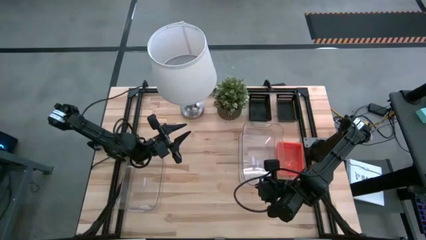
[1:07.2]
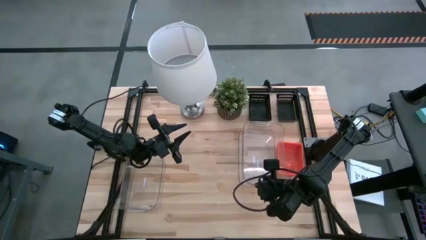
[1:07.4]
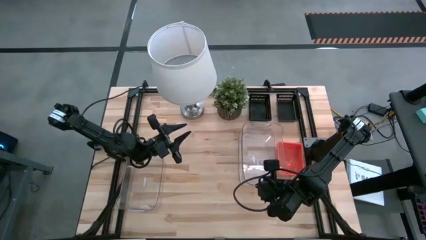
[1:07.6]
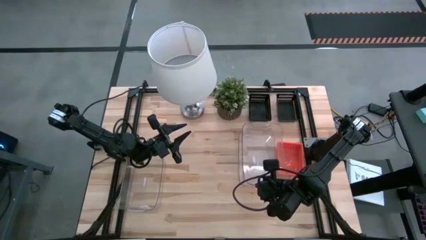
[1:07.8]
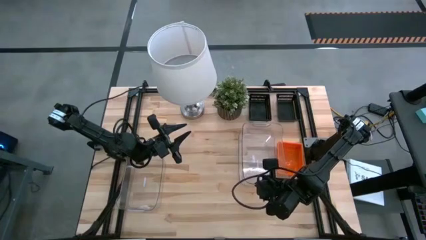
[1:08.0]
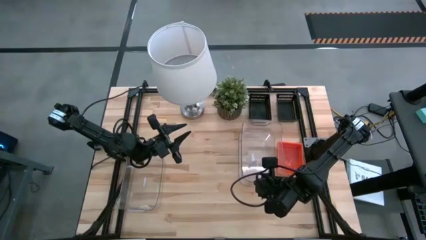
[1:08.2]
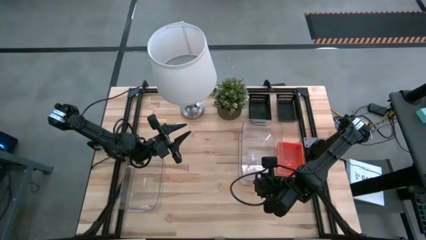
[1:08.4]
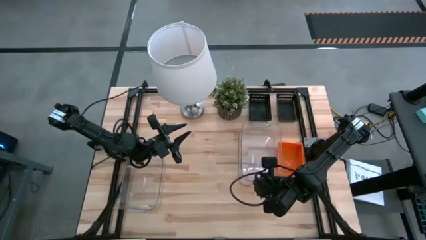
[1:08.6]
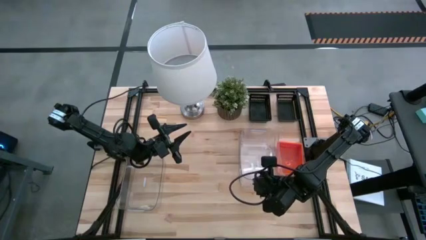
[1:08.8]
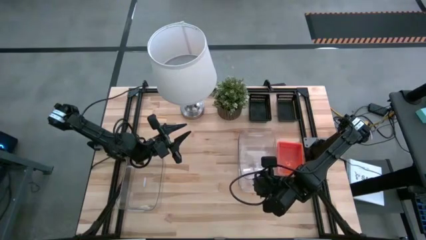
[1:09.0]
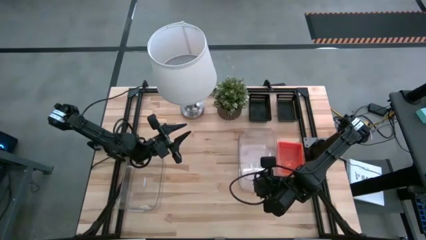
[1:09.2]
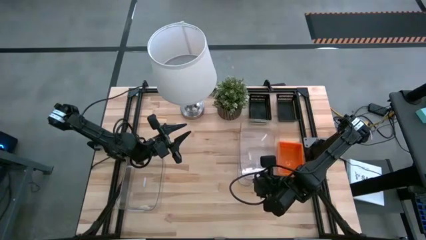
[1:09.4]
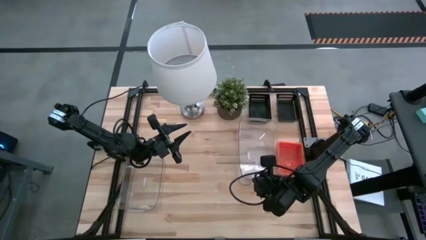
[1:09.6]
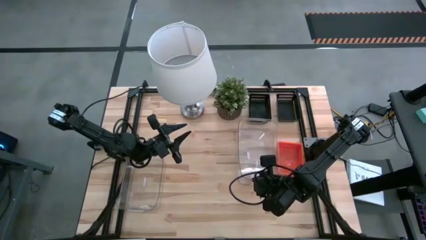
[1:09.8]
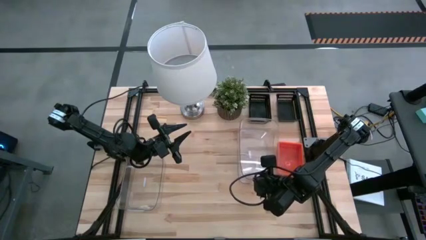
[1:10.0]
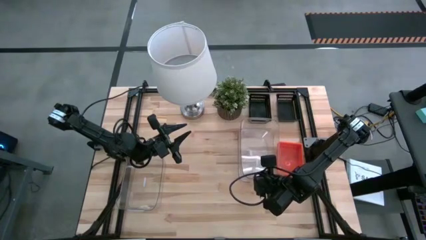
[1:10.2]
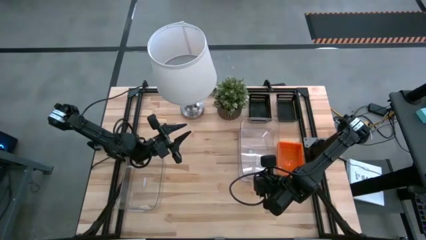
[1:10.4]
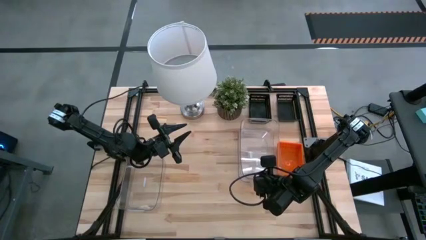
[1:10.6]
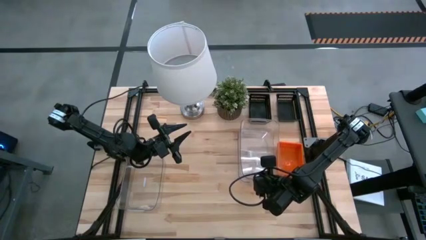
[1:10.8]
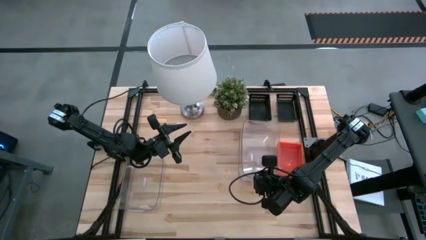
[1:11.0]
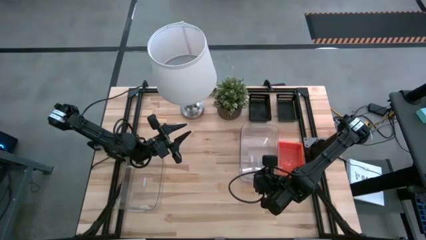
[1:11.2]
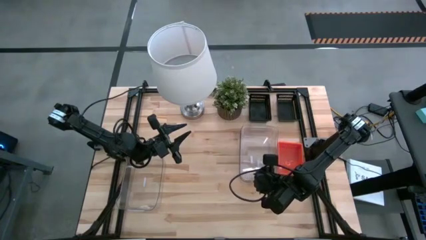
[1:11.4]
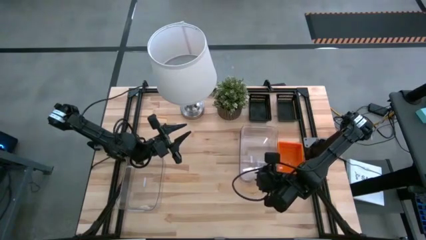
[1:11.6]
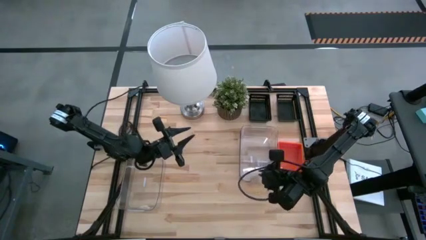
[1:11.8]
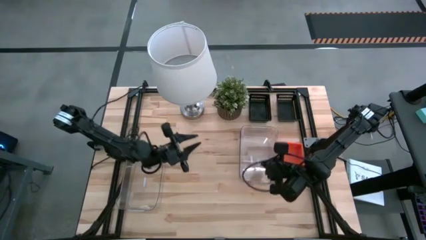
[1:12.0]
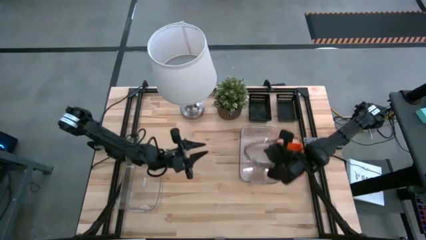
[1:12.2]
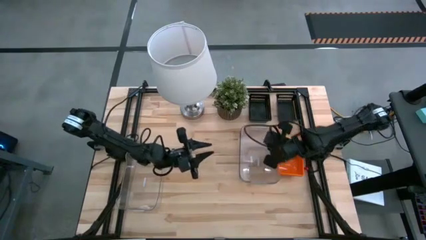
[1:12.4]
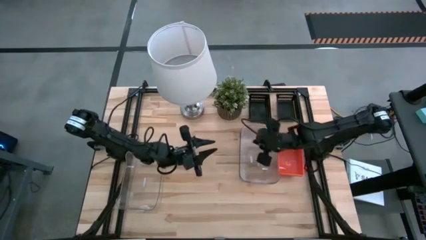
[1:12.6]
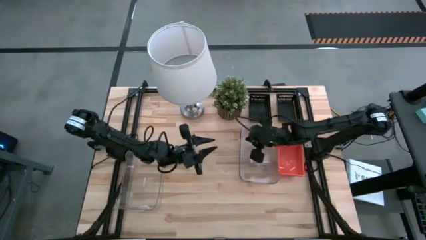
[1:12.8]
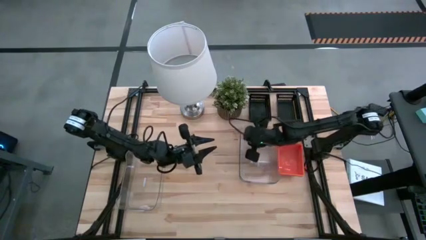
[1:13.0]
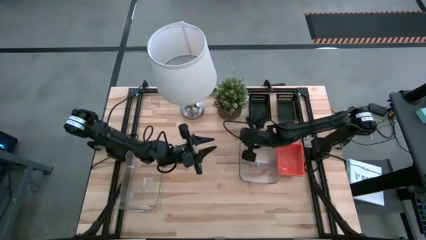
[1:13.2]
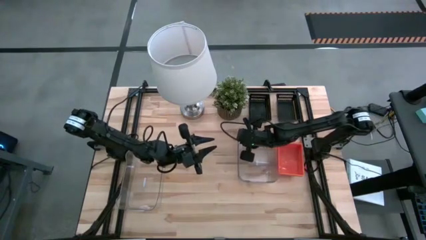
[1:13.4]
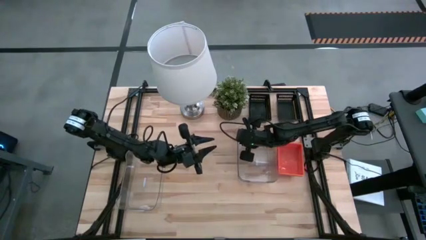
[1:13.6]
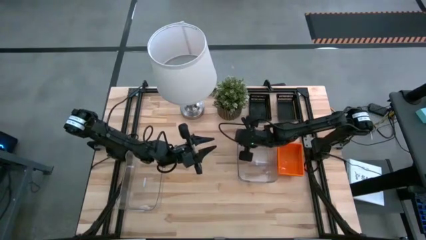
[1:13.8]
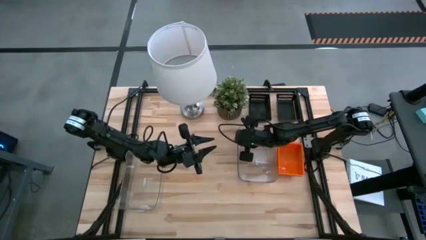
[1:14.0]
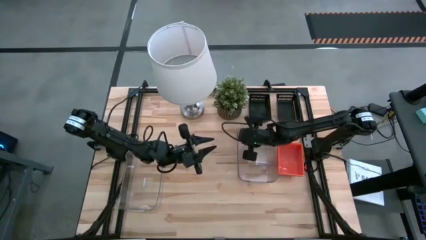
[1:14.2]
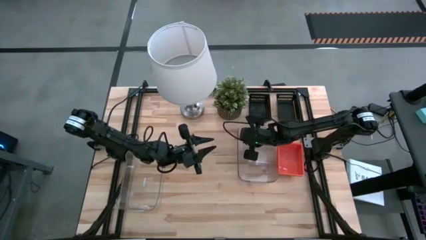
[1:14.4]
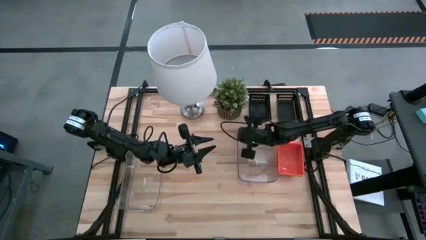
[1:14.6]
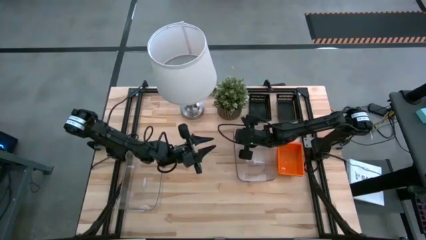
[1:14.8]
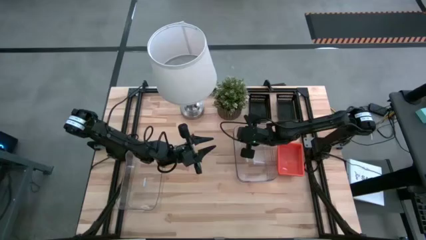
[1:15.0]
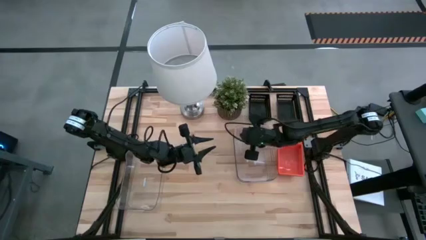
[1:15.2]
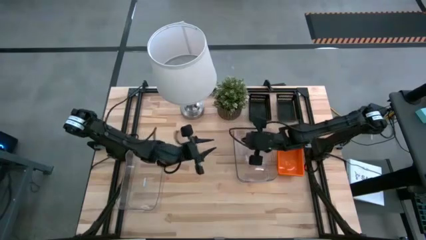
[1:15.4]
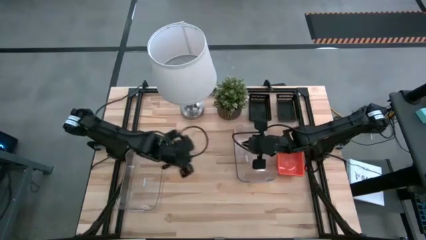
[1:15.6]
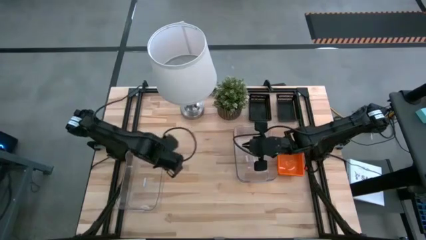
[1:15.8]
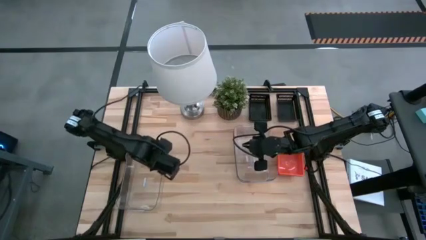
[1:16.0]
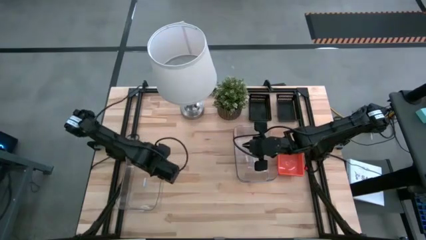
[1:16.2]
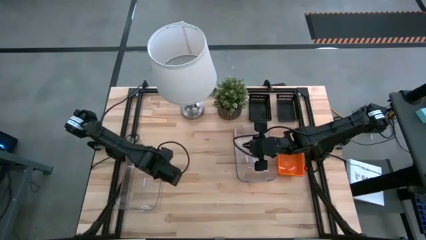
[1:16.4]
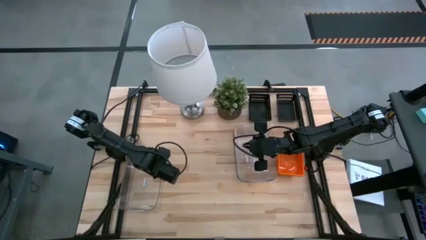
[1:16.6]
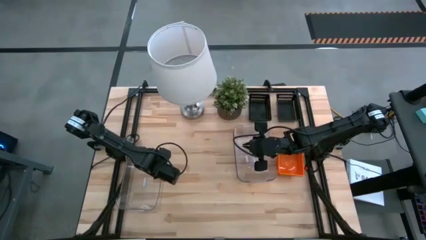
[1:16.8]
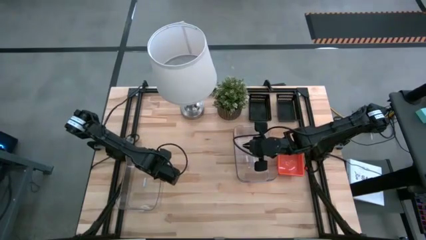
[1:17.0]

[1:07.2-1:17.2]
Stack the middle transparent bin on the right transparent bin

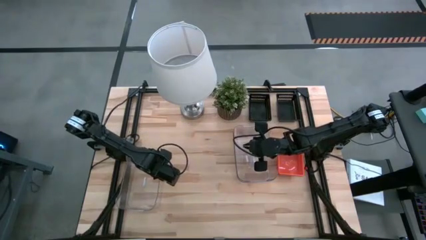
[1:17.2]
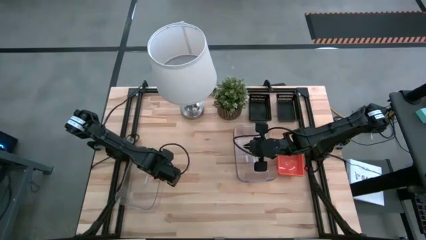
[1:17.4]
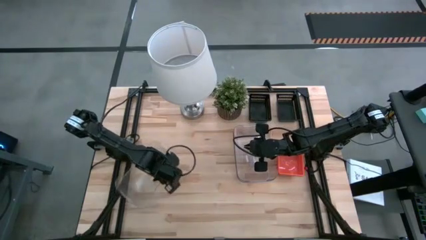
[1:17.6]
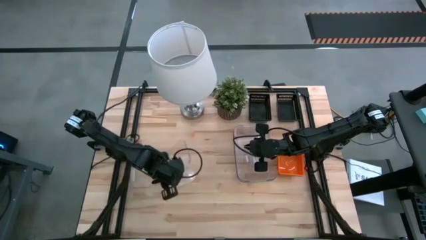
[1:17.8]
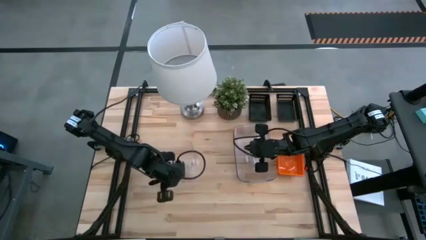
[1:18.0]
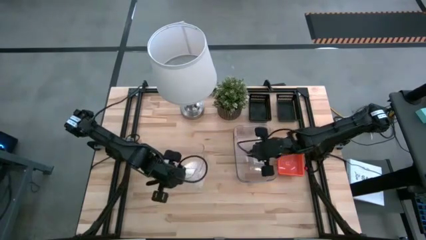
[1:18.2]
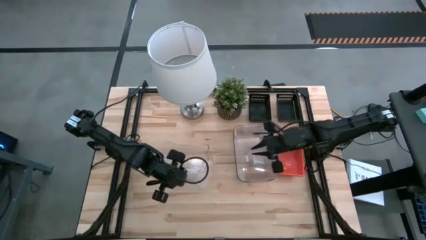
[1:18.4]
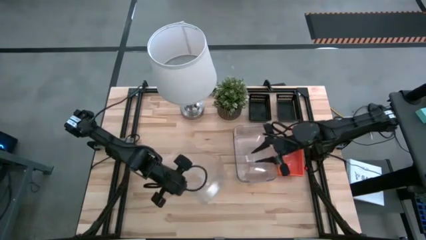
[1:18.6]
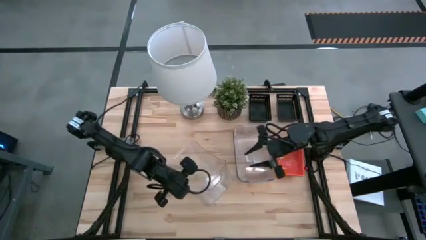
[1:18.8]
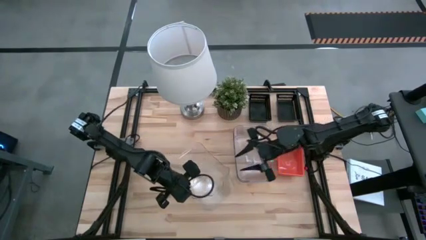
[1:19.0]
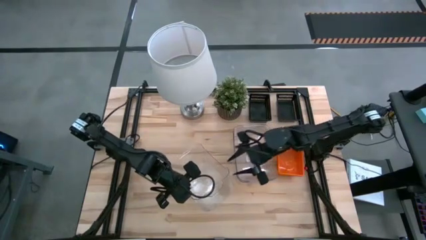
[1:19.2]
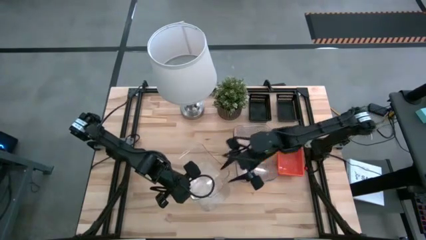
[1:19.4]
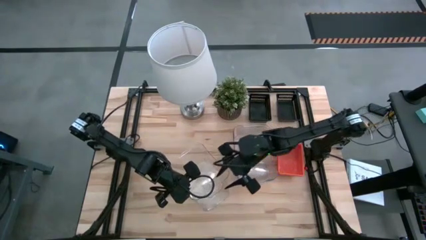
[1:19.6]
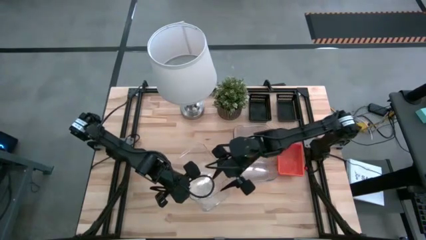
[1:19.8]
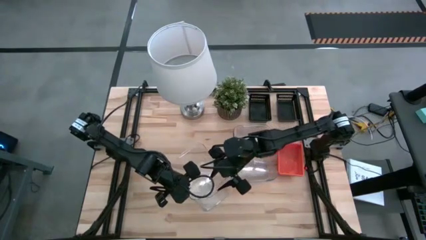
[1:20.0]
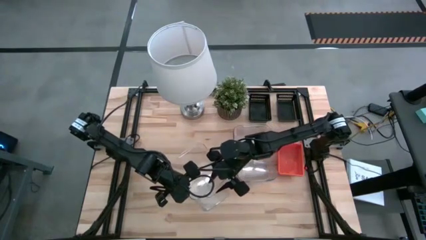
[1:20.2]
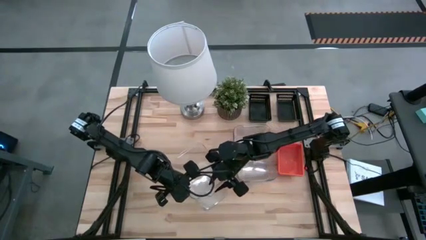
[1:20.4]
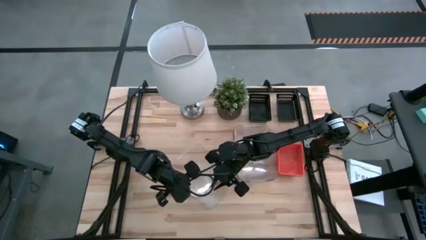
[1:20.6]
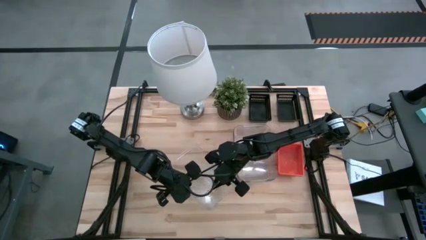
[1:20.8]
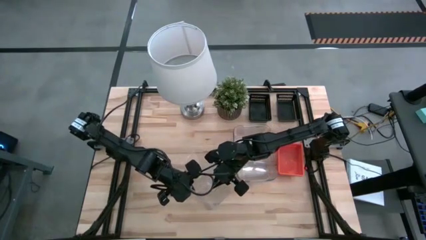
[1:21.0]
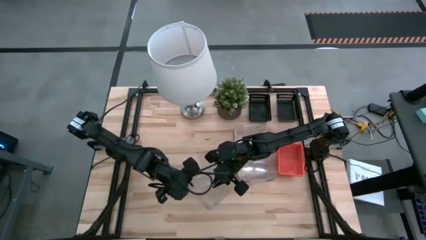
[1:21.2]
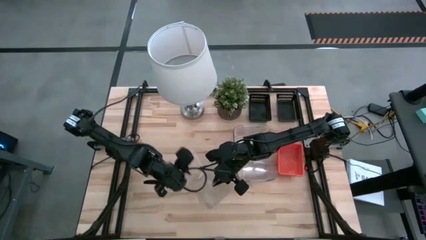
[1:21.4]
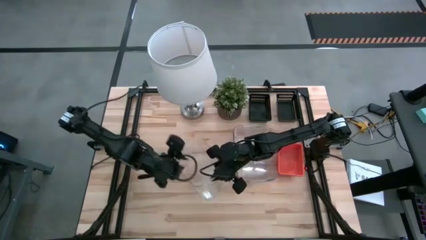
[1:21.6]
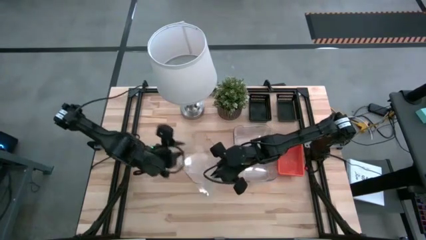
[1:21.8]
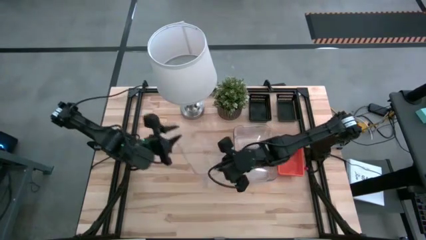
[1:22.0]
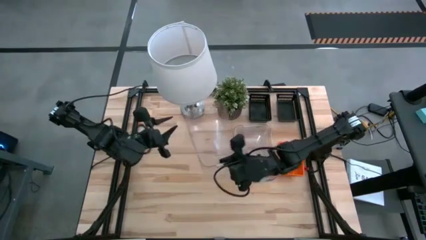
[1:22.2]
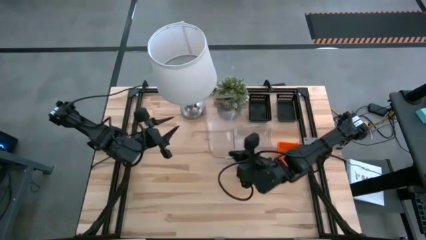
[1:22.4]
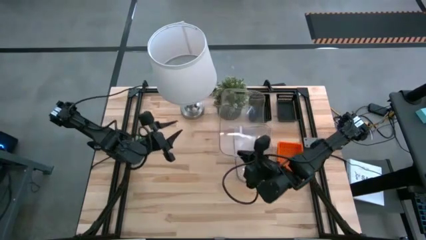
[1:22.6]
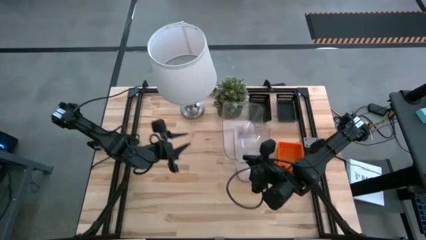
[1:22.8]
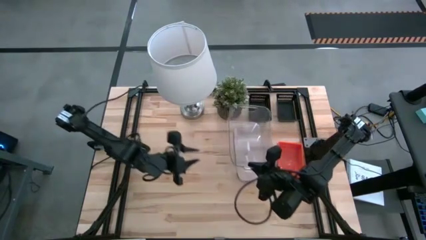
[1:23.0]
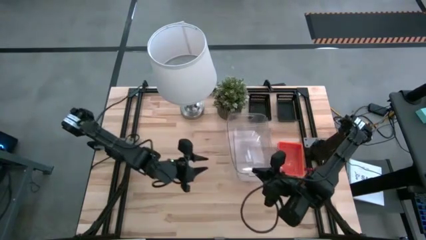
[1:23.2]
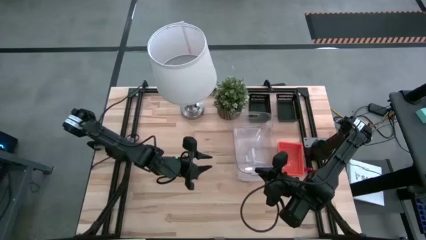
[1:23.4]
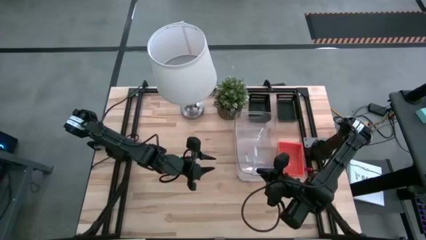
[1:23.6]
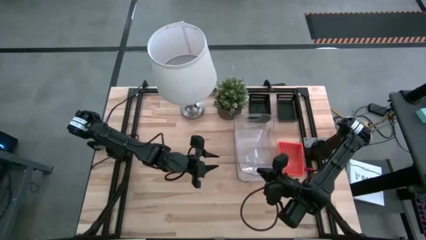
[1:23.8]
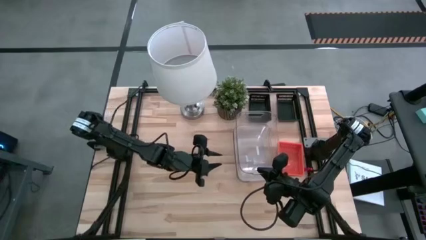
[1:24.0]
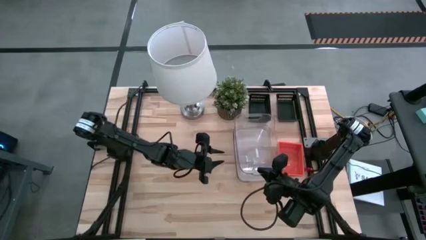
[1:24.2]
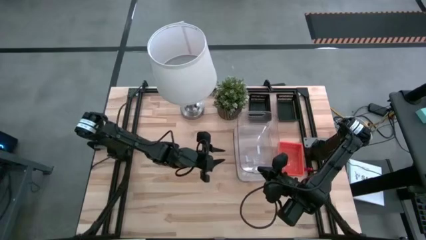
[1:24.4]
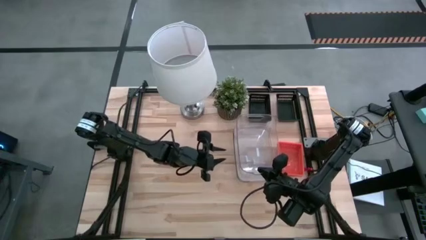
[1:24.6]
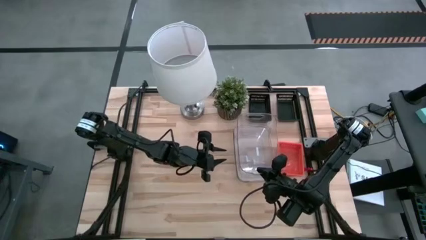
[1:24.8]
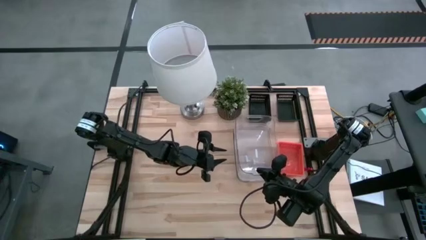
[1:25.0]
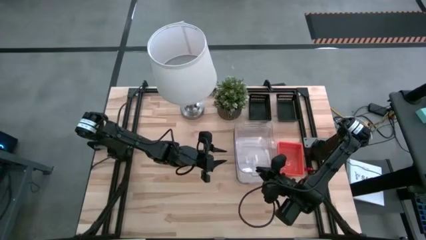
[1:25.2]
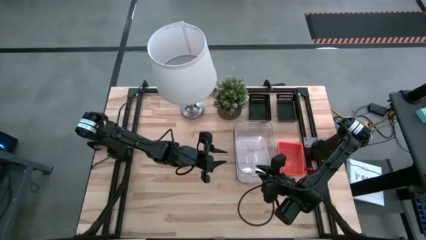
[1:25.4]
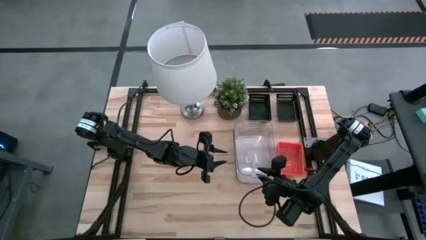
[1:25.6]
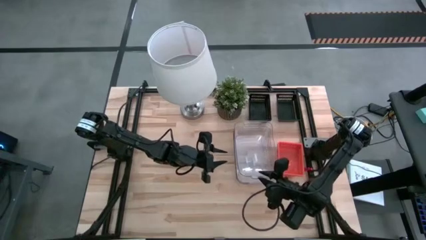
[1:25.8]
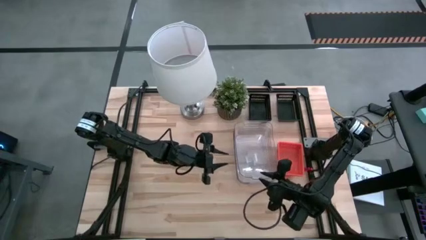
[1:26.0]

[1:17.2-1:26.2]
Stack the left transparent bin on the transparent bins
